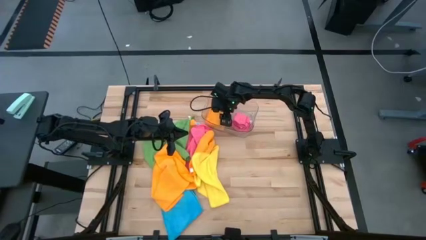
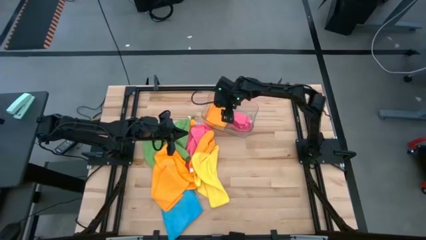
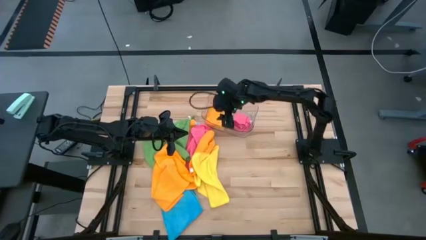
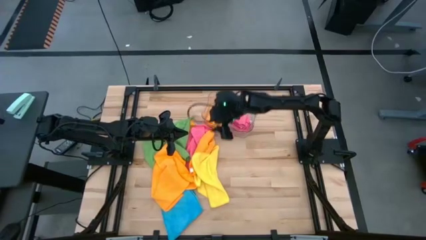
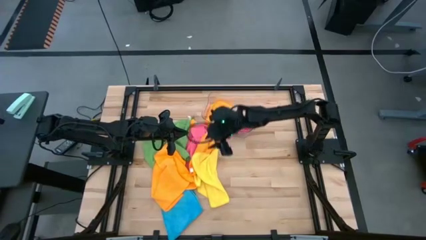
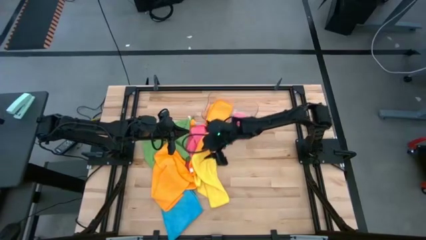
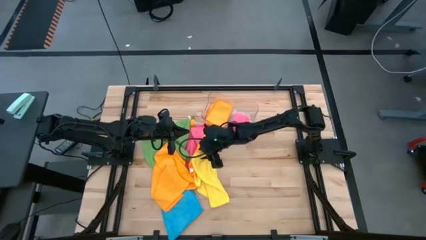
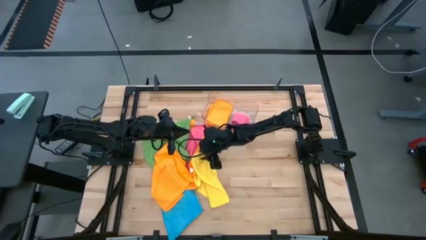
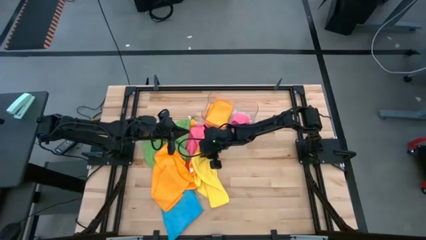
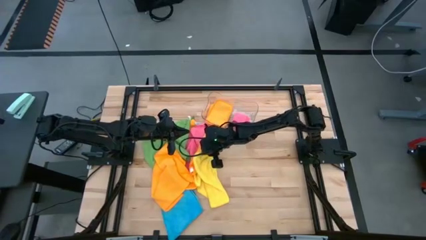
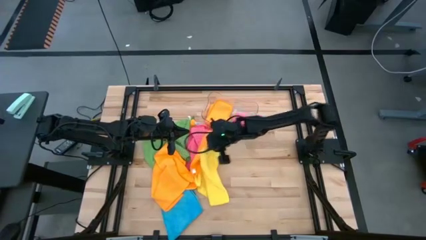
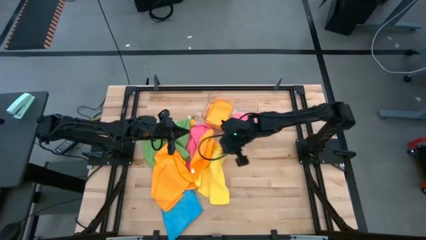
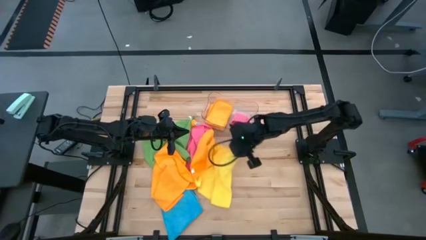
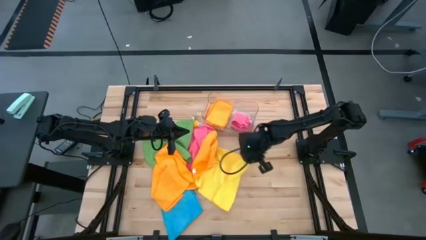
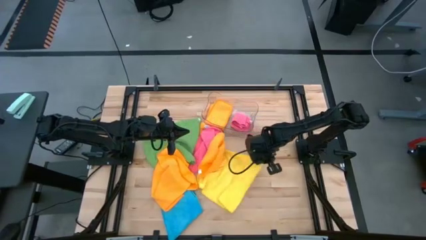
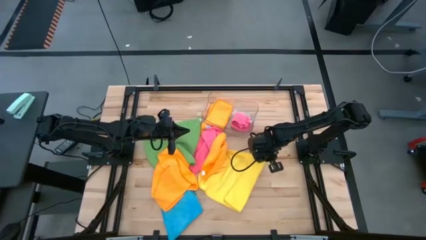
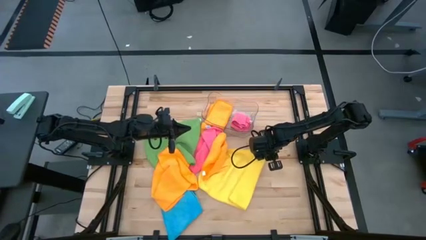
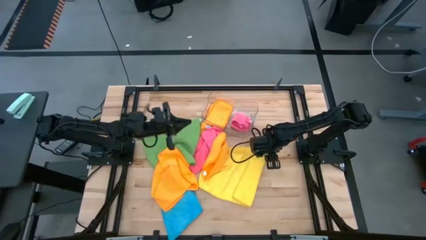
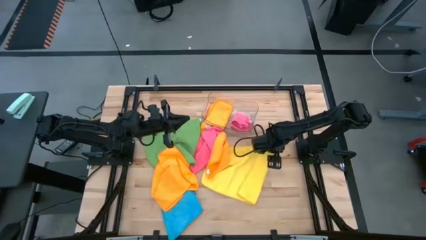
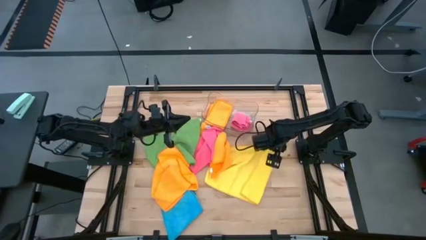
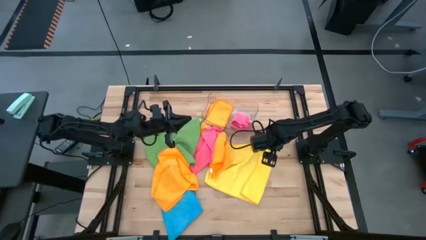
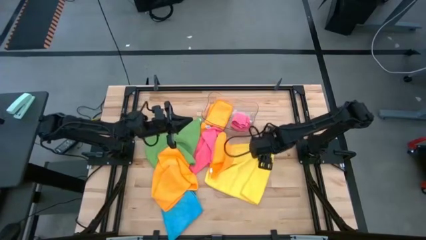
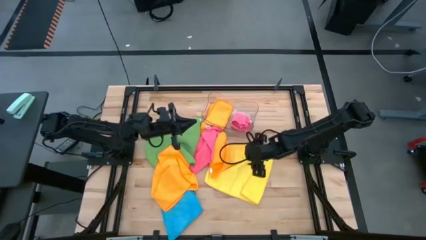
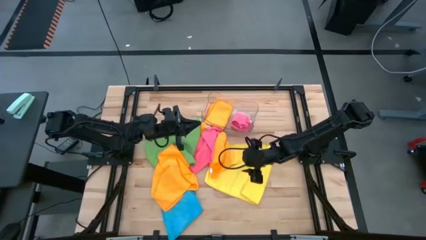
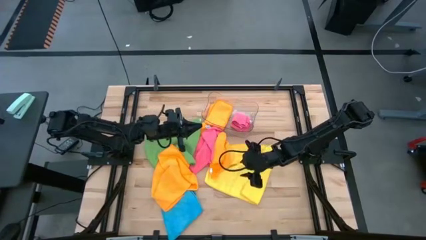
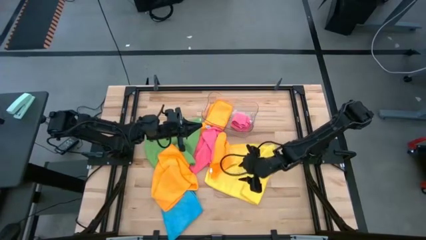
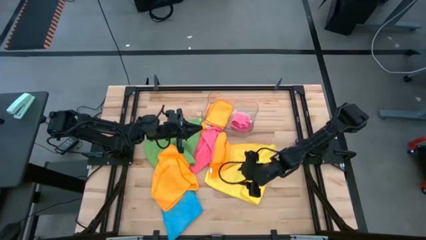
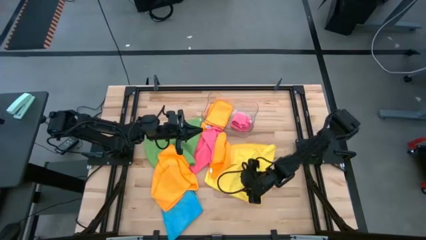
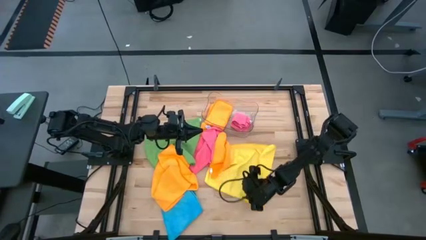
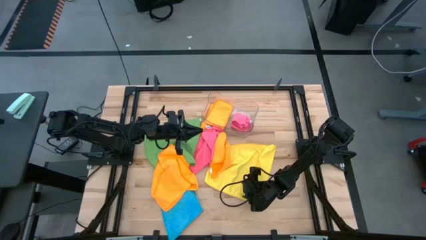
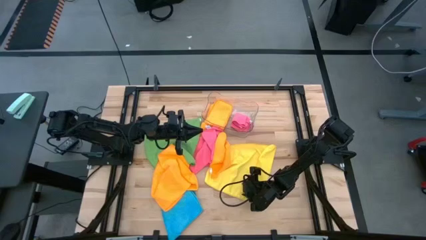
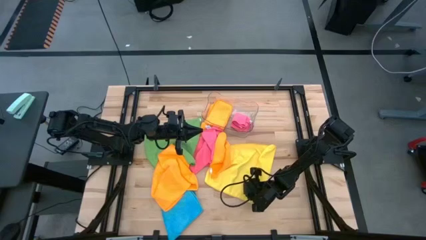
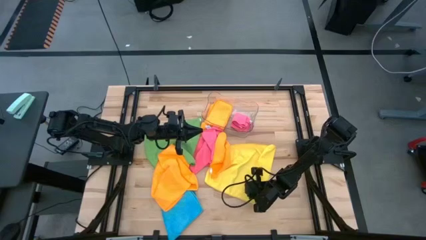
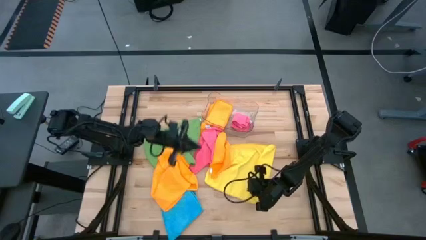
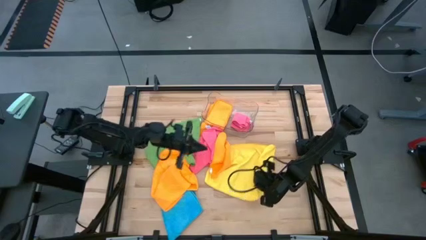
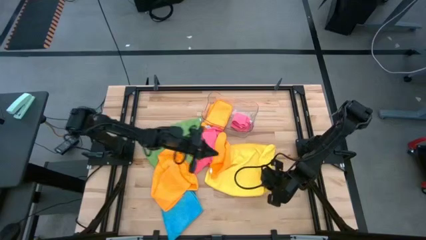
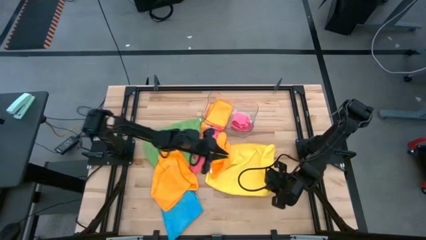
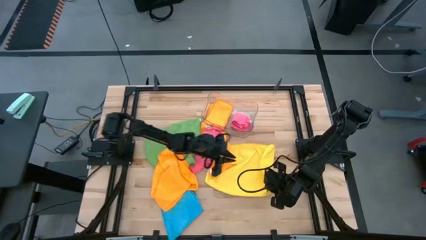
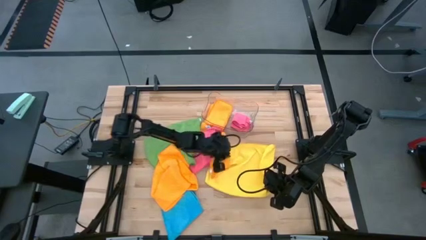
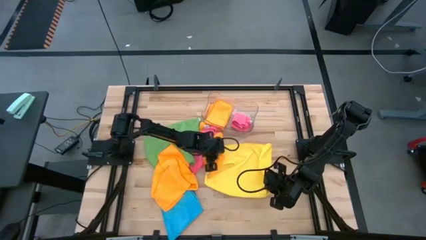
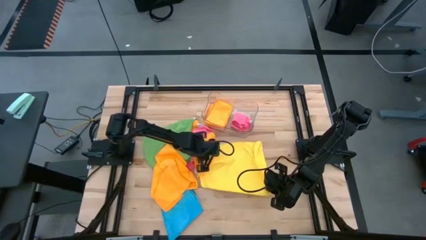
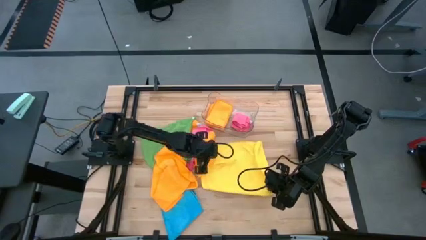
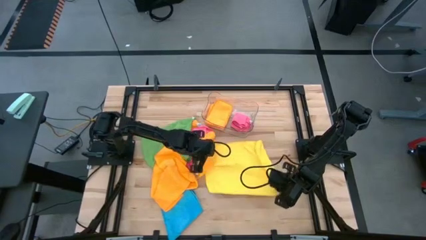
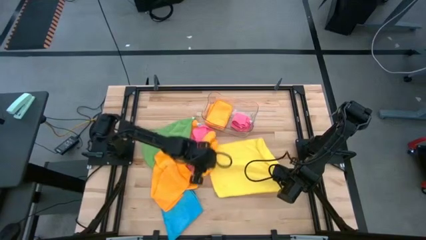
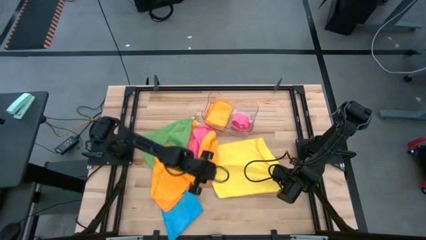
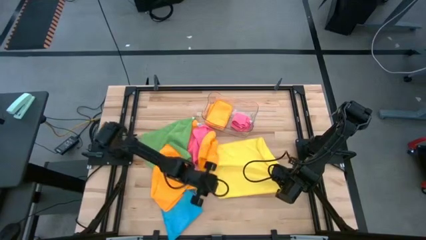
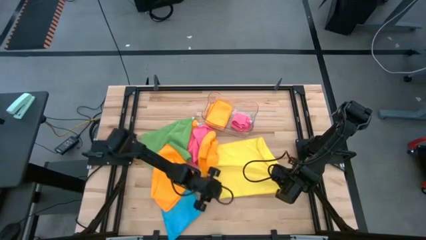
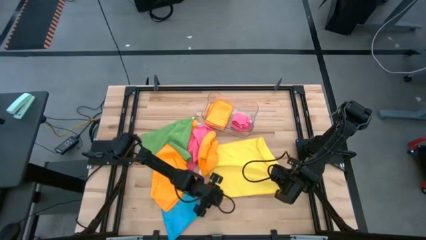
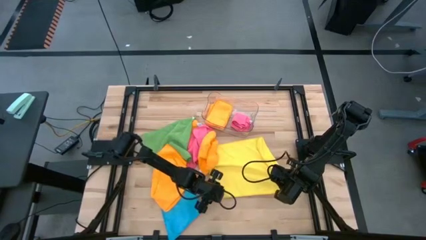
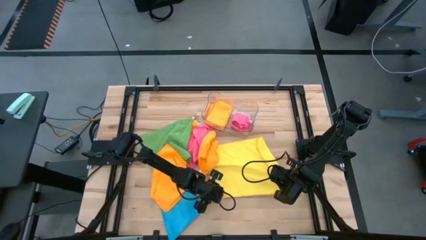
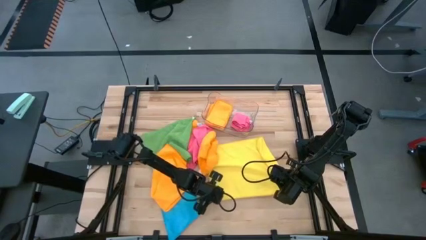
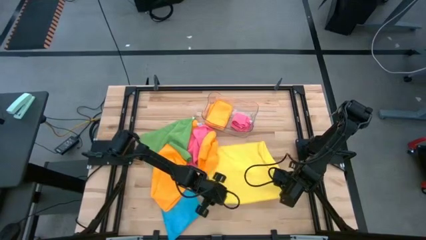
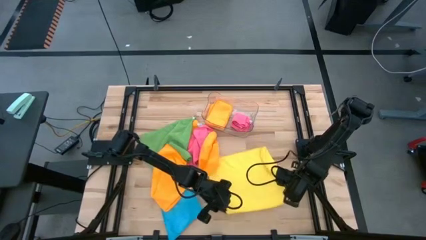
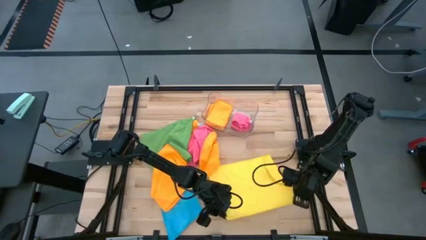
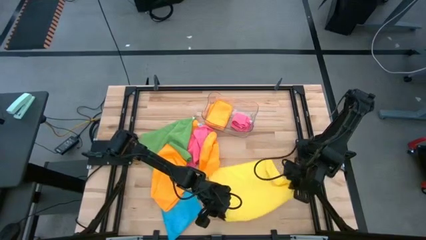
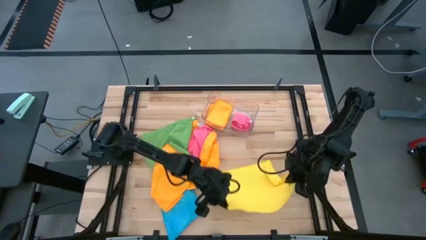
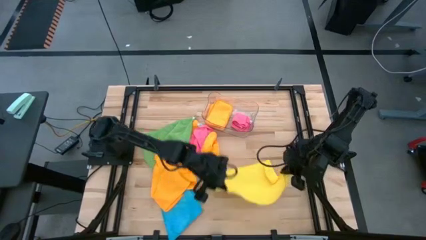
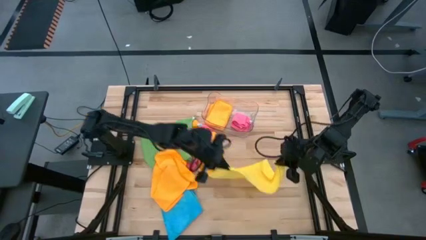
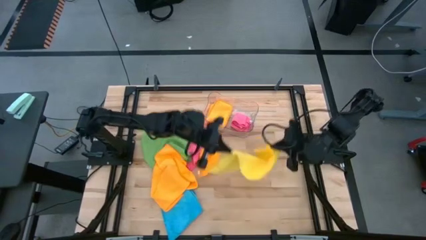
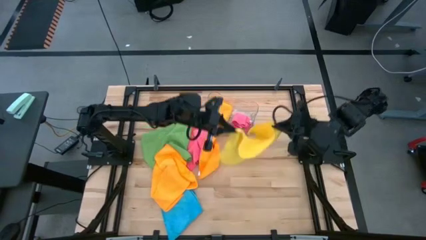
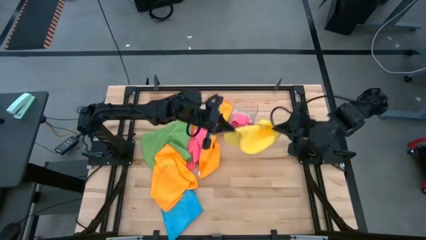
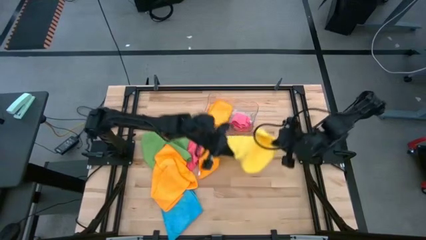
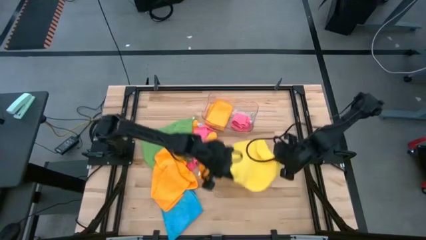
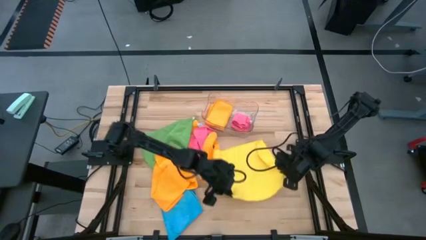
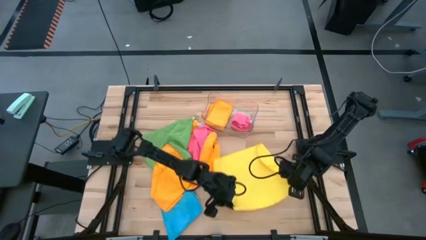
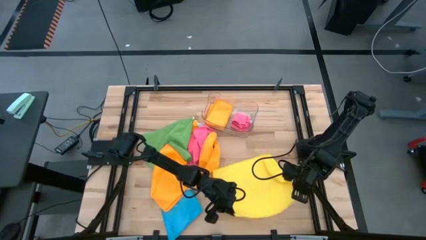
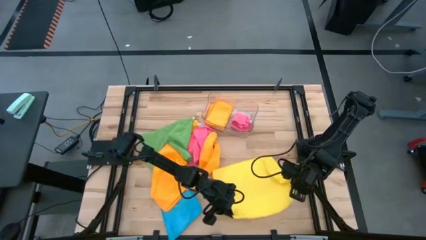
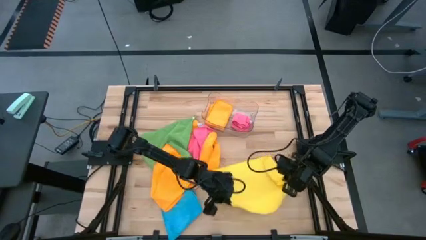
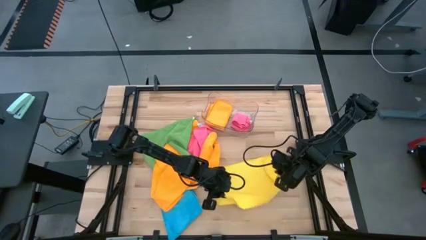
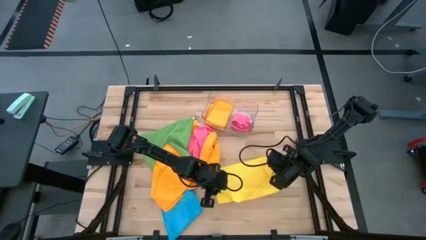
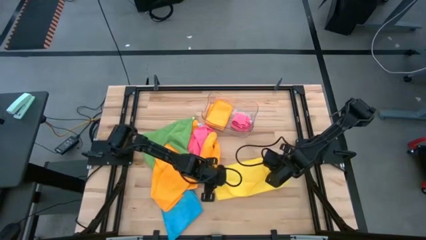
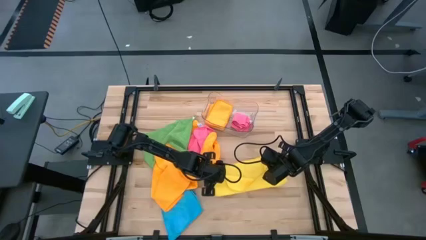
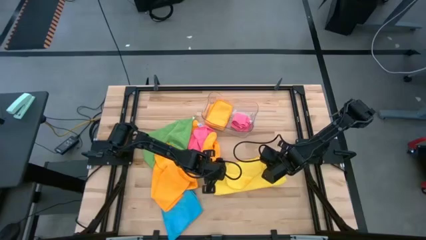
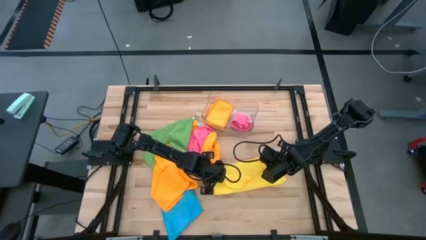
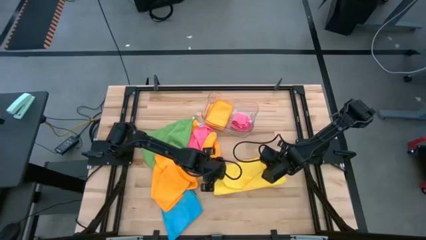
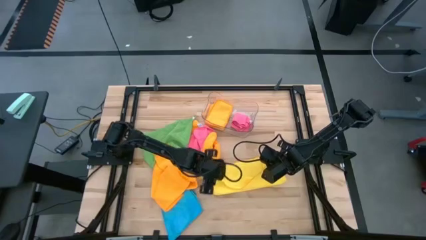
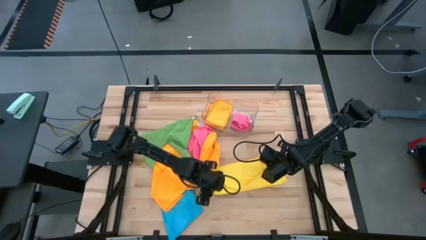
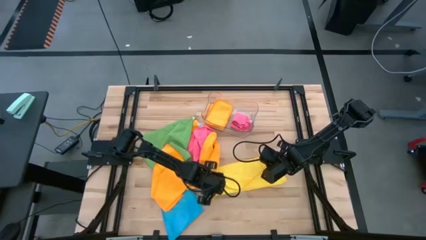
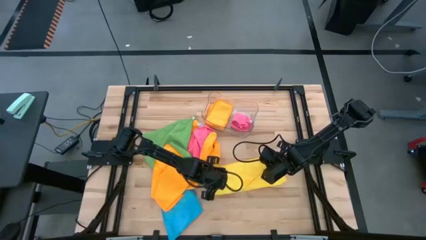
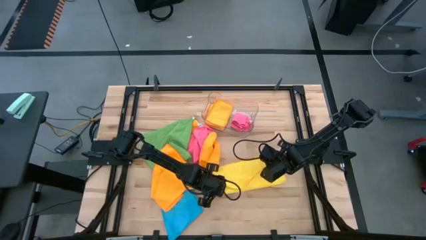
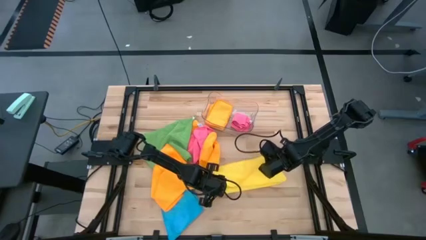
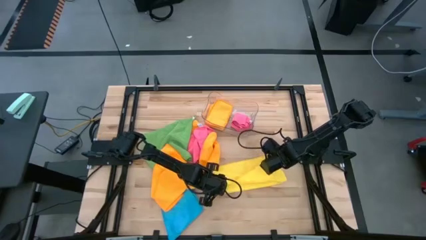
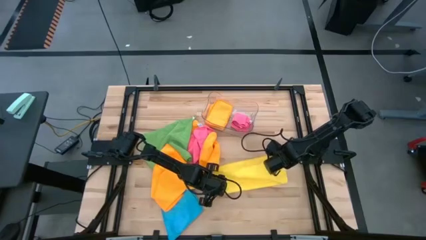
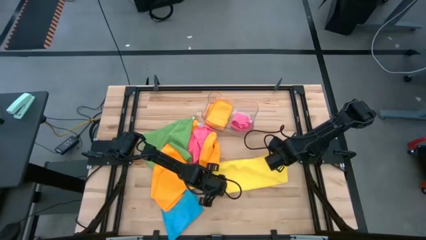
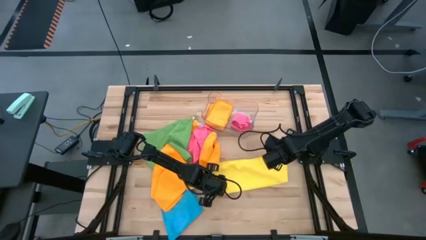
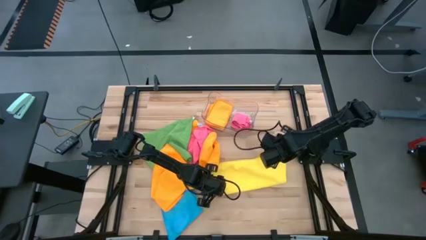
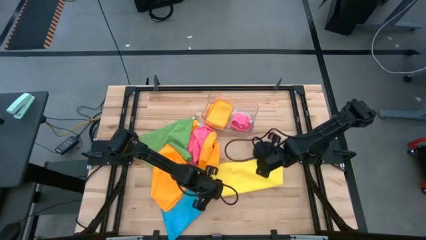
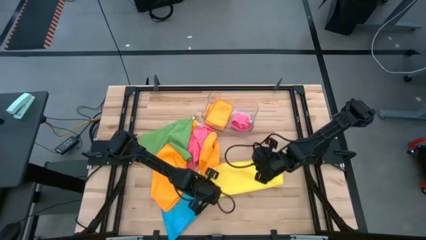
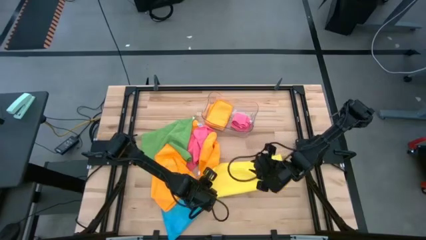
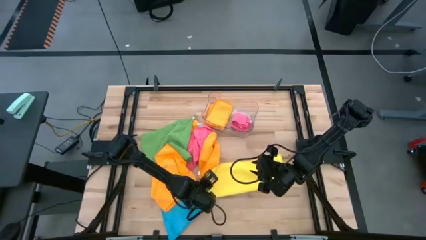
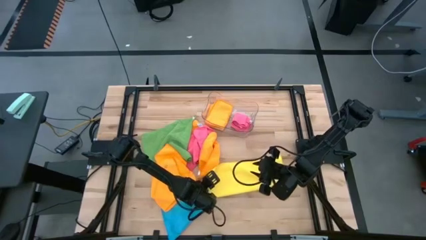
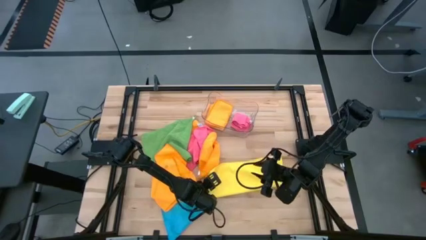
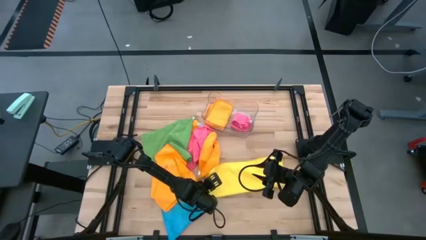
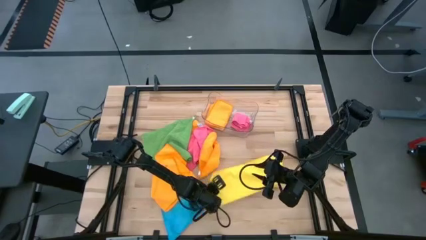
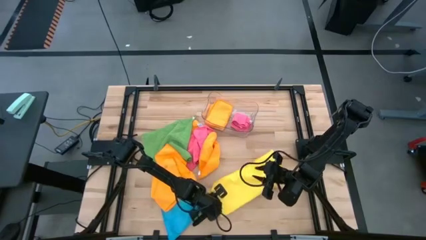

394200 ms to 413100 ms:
Task: Fold microfiber towels
Fold the yellow microfiber cloth
